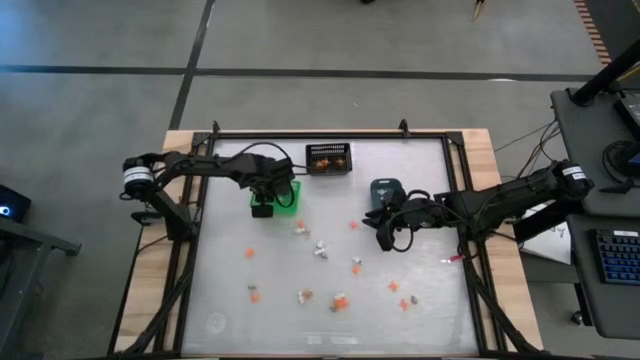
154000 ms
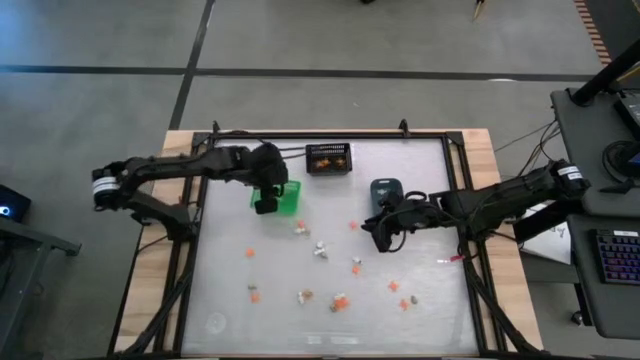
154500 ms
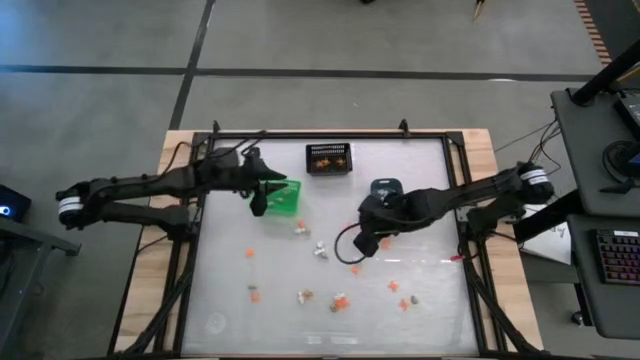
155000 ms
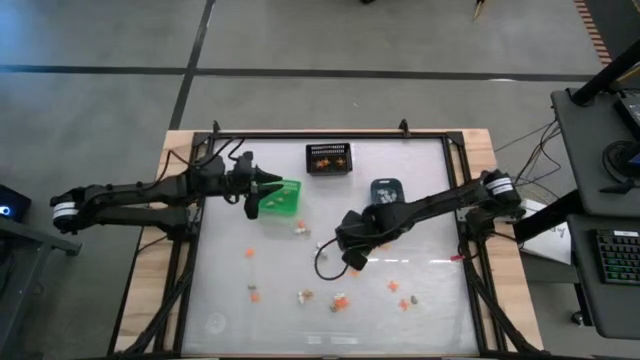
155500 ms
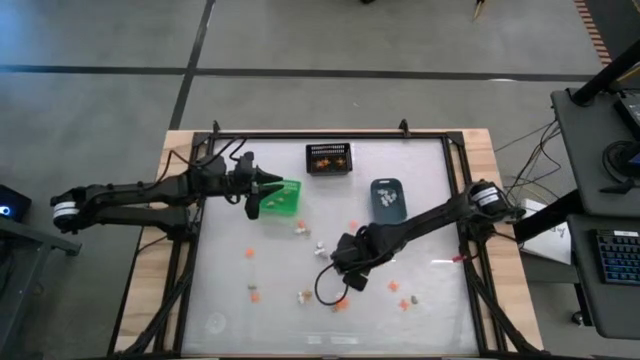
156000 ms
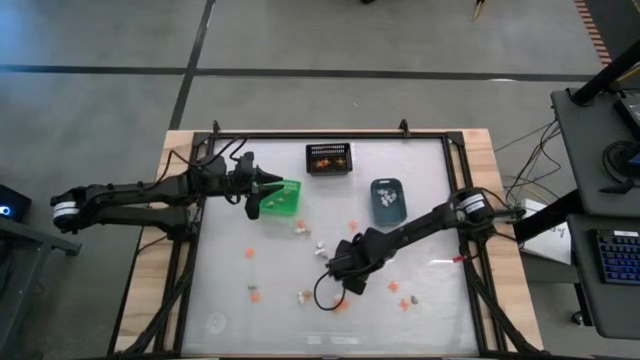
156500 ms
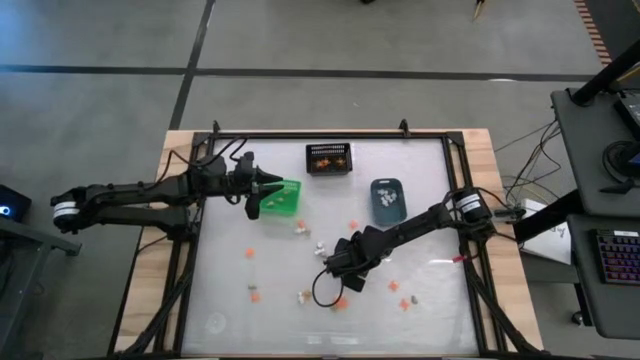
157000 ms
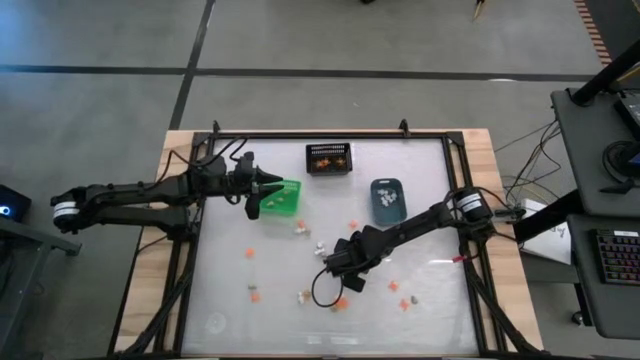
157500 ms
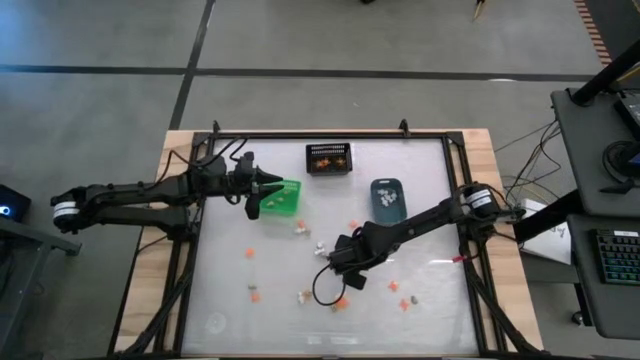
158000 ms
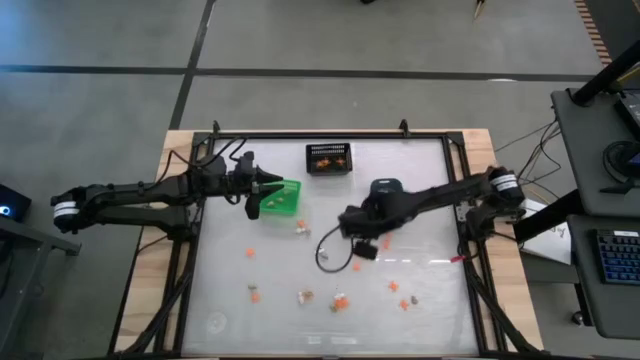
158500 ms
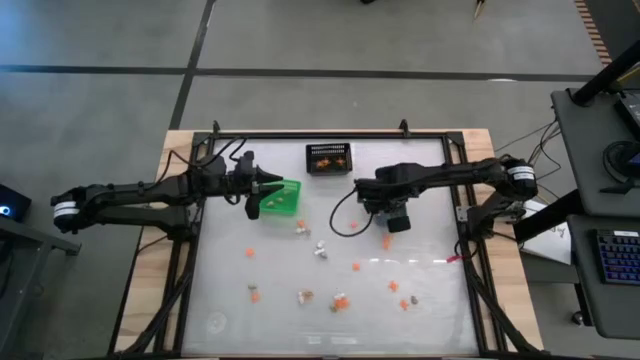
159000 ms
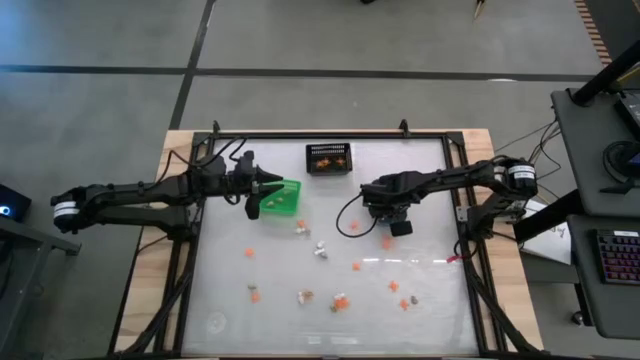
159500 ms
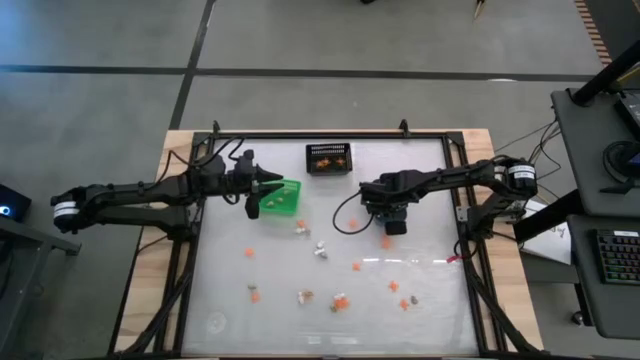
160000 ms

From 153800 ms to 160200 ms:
Task: Sort Halloween decoration
Put the white skeleton toy into the blue bin

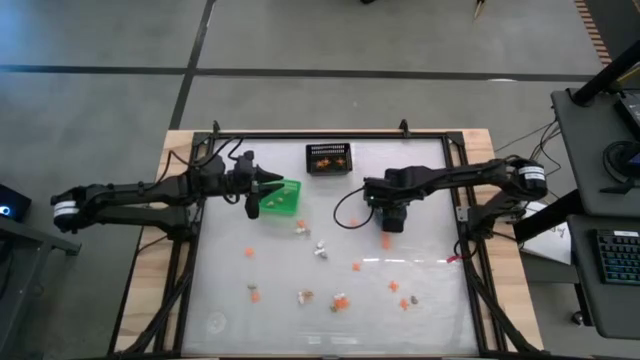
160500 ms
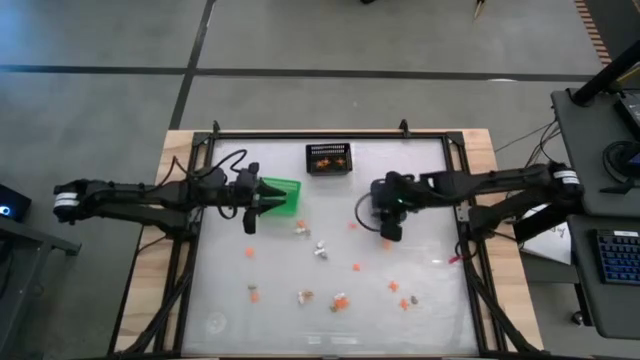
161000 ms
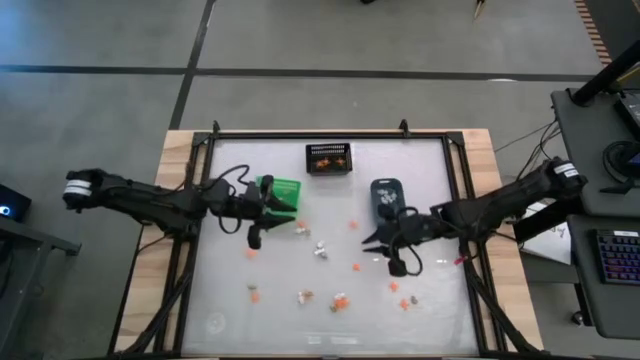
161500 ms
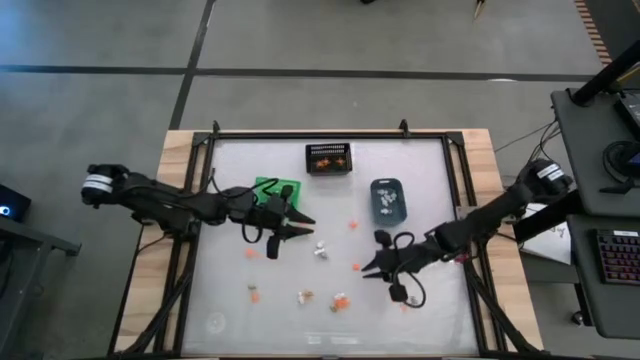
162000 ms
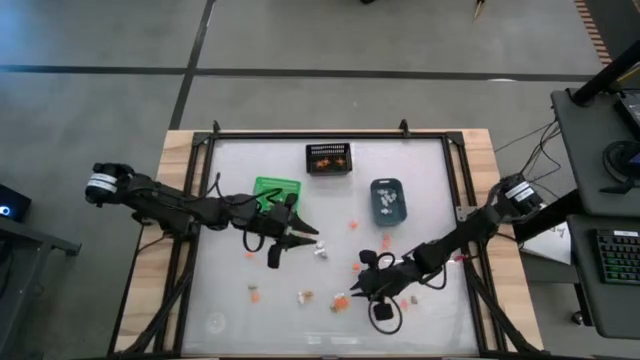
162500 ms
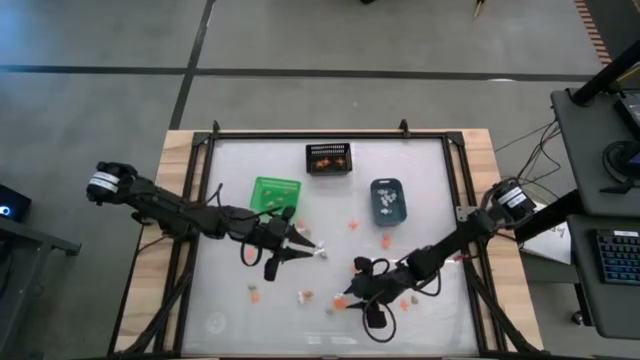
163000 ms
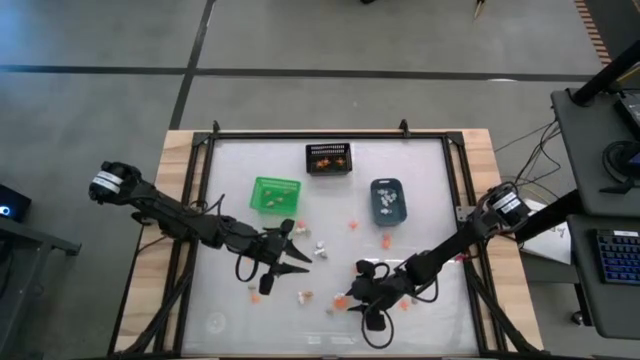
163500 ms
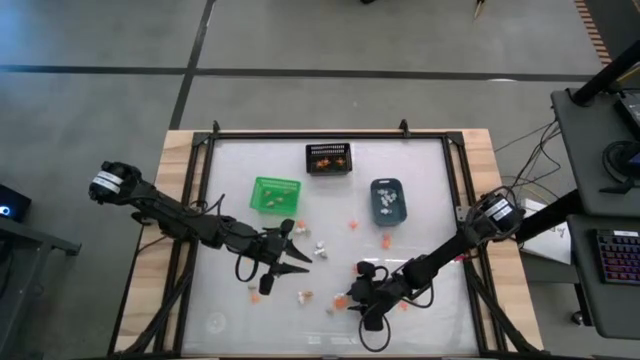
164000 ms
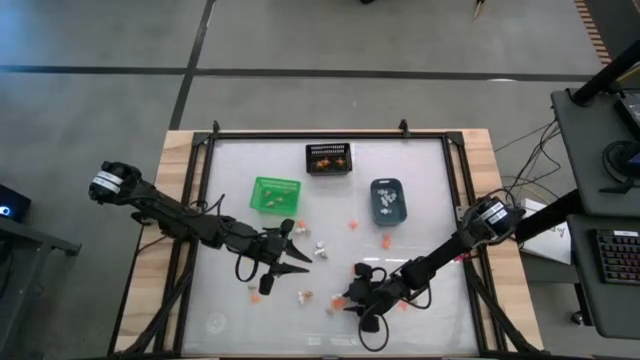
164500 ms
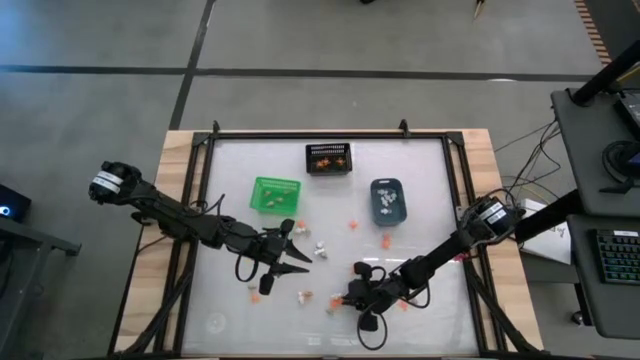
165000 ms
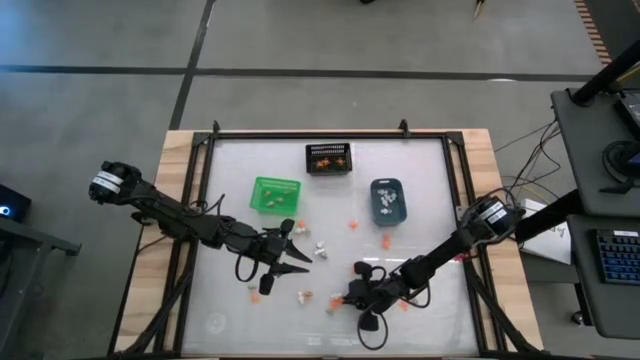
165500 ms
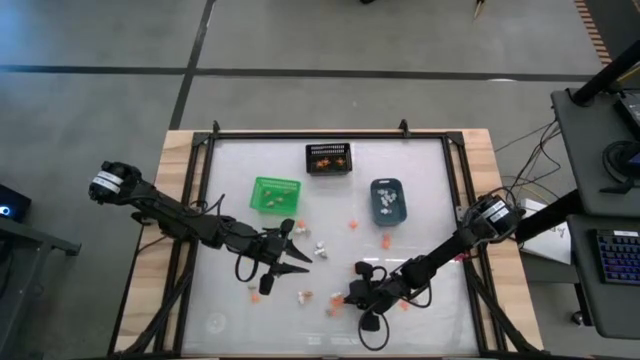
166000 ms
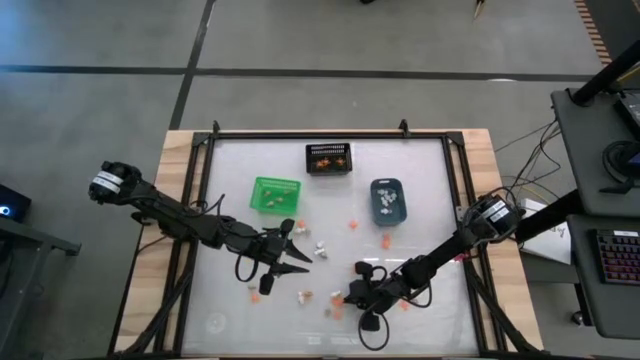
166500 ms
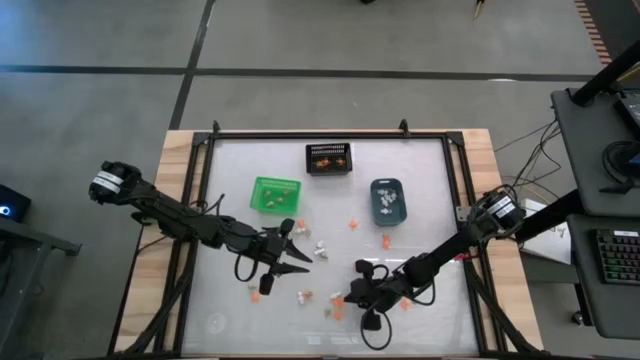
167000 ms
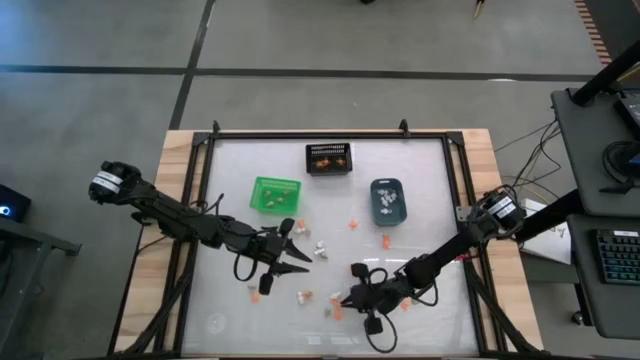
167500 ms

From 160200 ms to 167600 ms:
Put the orange spider toy into the black bin

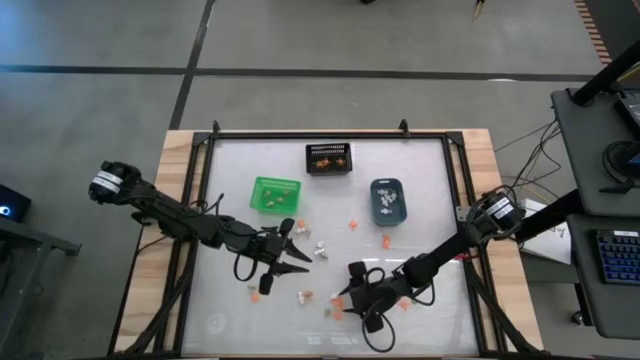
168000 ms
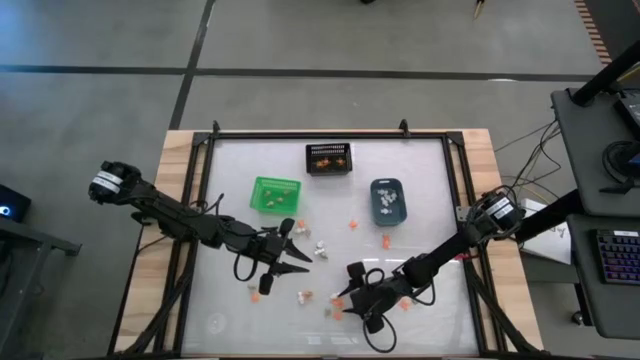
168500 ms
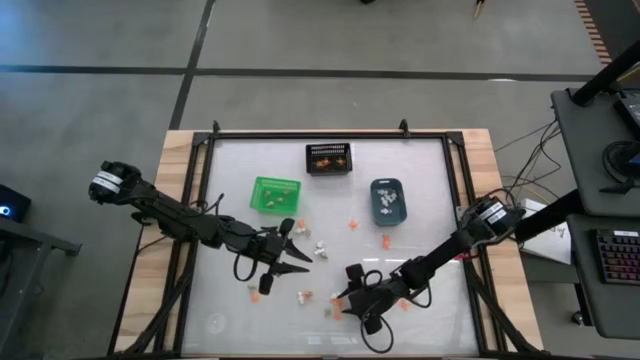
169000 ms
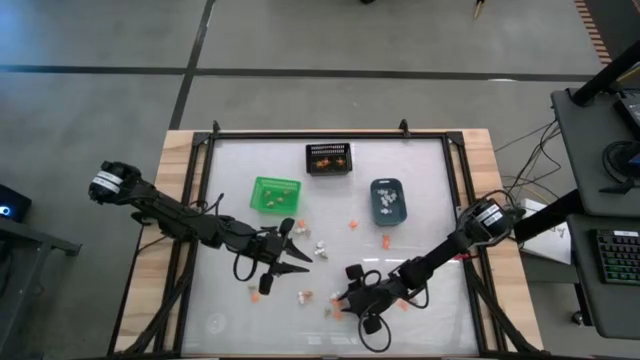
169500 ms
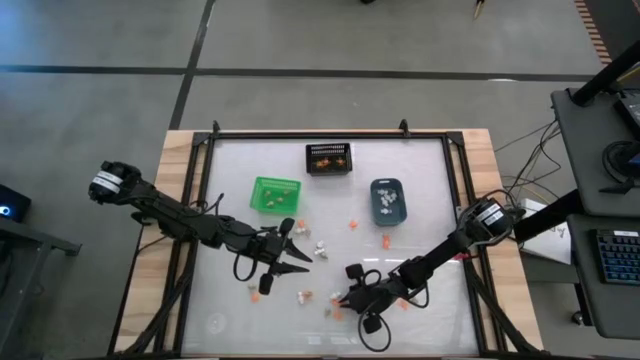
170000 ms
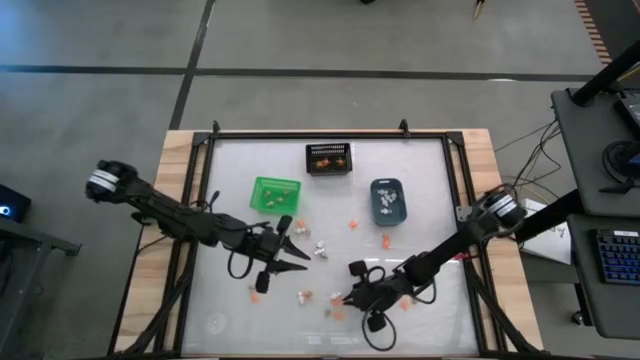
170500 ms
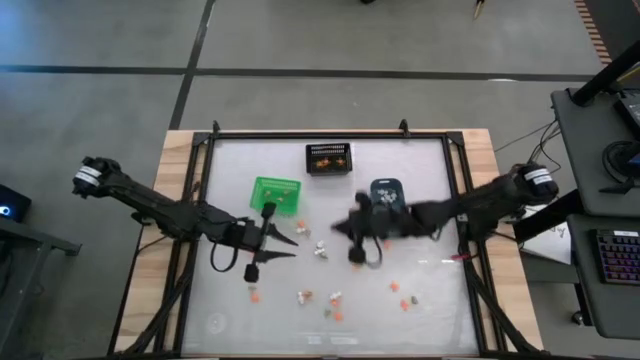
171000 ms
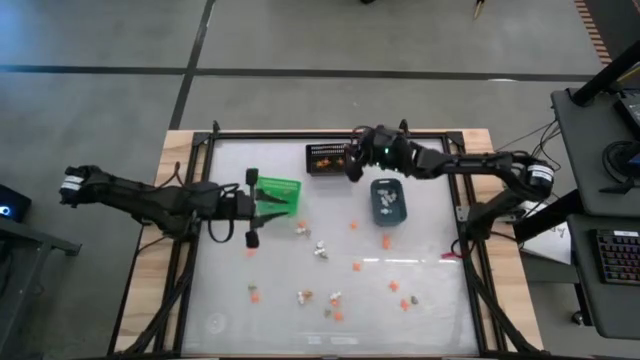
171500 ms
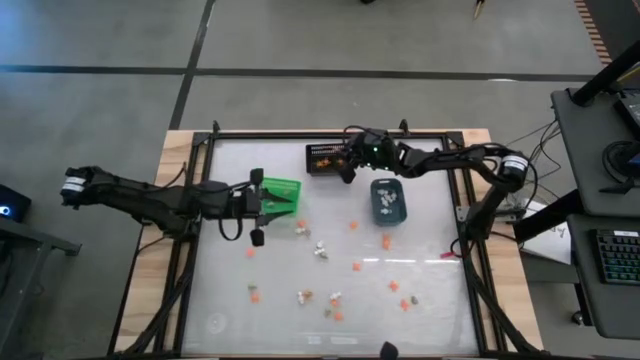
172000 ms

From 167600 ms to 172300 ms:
Put the orange spider toy into the black bin

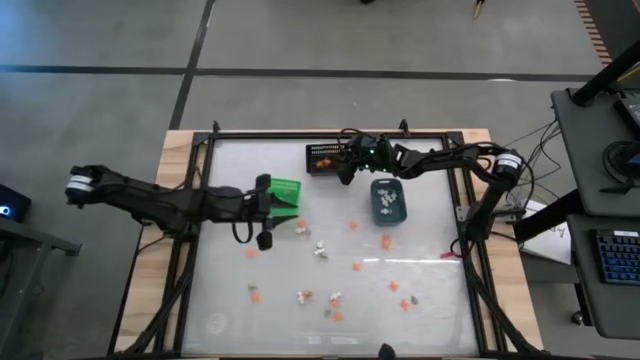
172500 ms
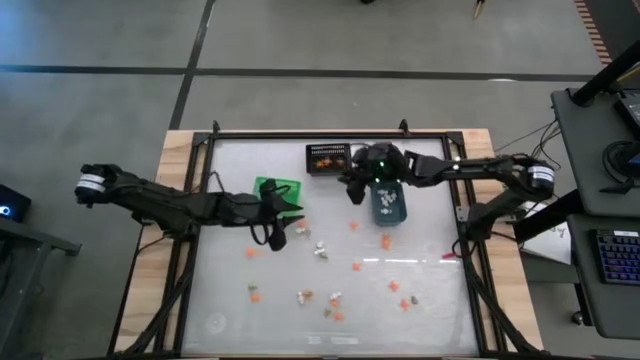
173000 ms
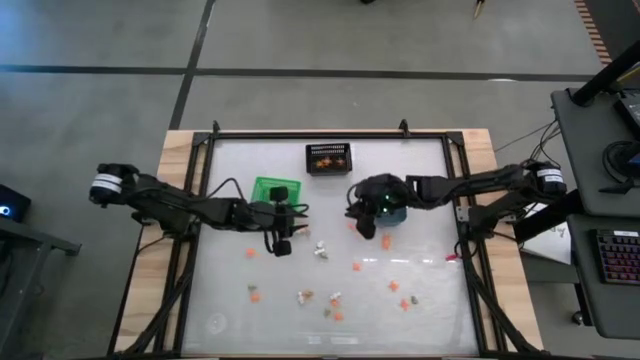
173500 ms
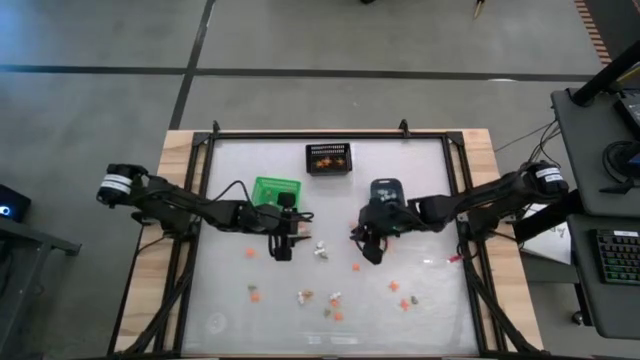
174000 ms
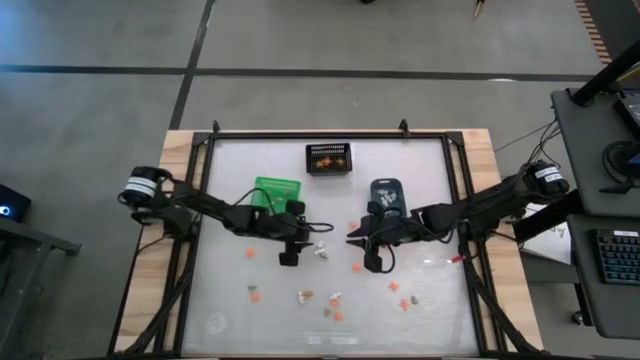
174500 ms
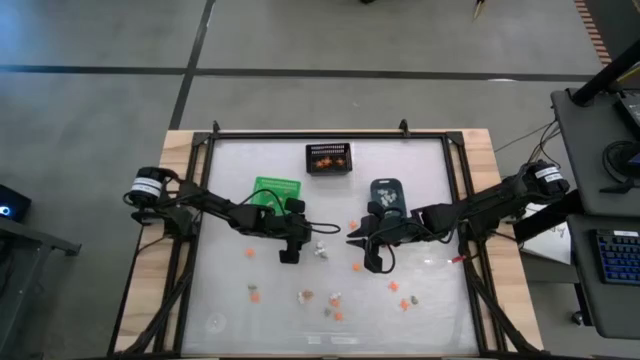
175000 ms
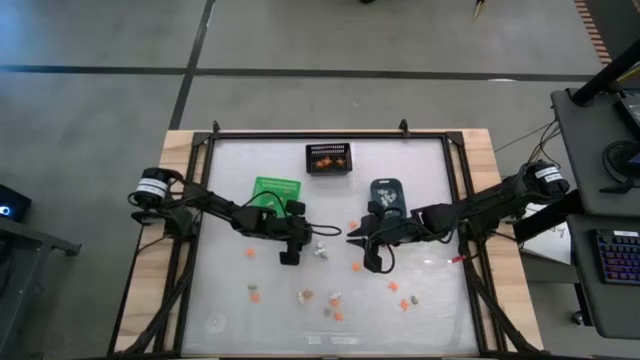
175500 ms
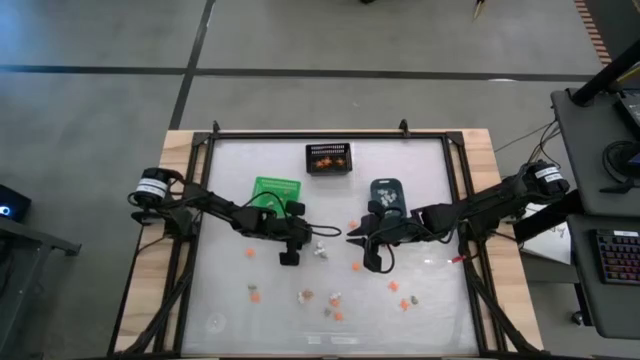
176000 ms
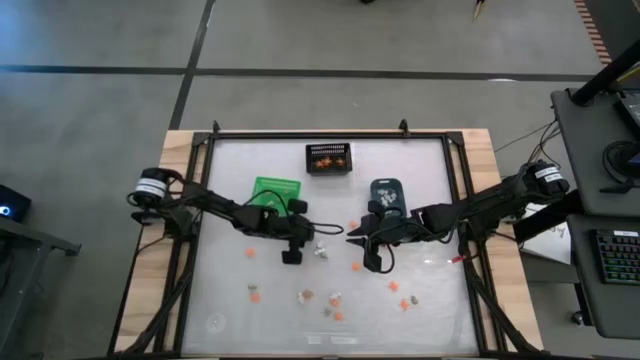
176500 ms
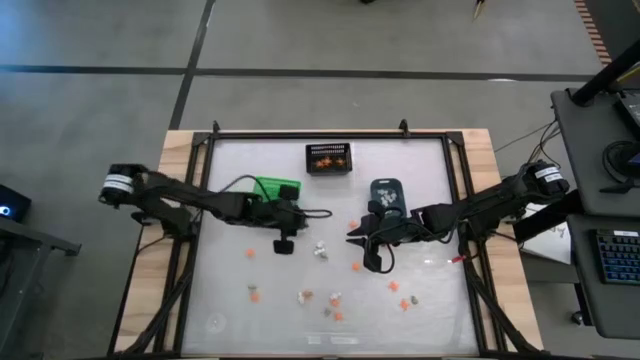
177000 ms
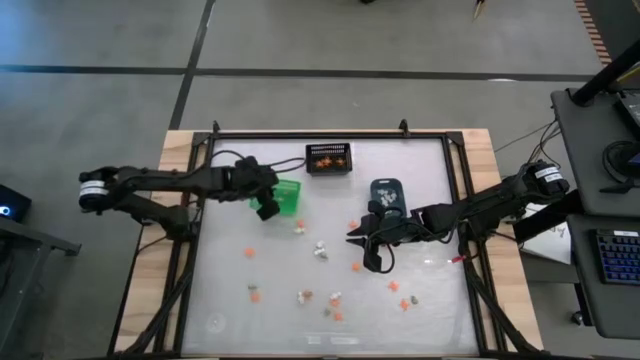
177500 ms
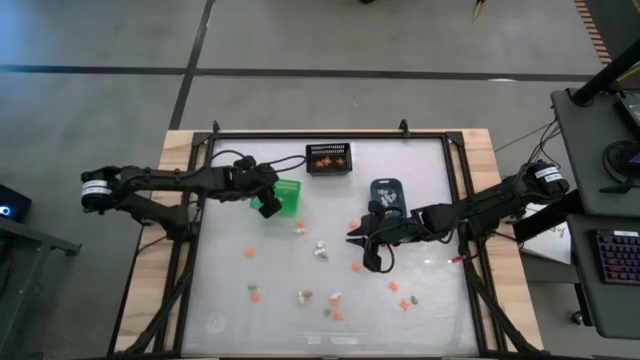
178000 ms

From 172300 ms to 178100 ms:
Put the gray skull toy into the green bin
